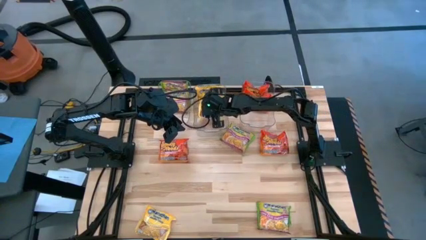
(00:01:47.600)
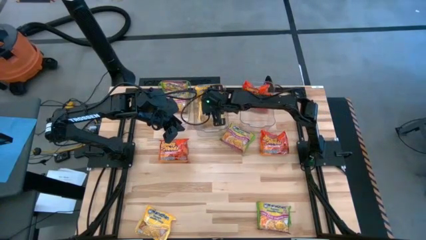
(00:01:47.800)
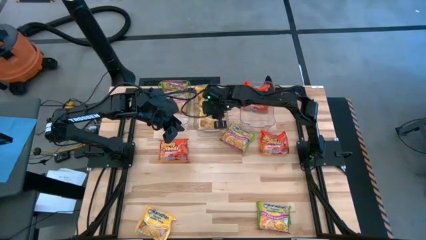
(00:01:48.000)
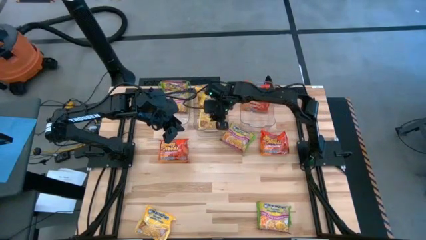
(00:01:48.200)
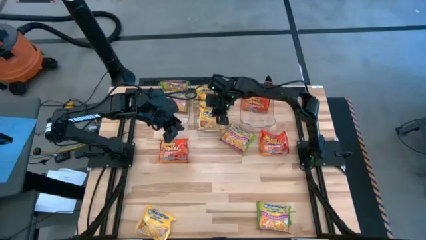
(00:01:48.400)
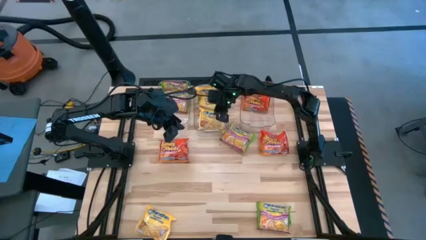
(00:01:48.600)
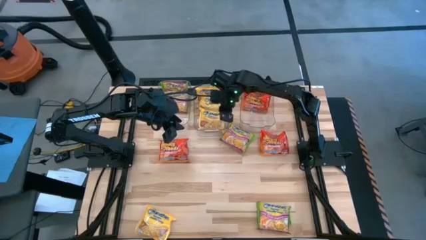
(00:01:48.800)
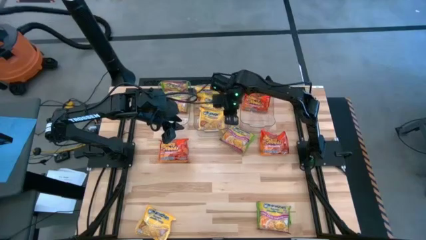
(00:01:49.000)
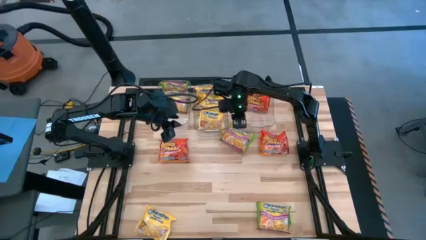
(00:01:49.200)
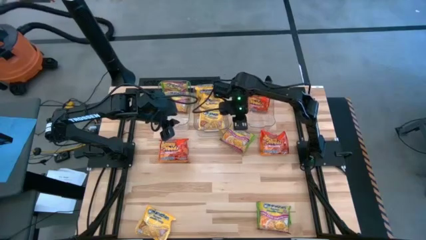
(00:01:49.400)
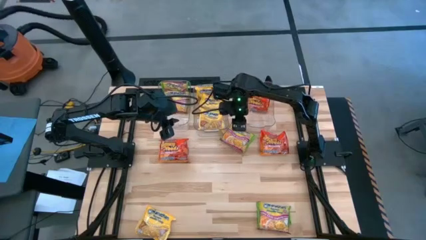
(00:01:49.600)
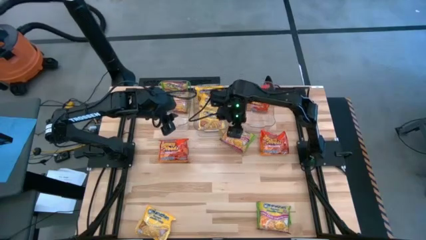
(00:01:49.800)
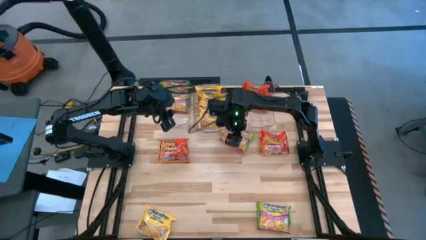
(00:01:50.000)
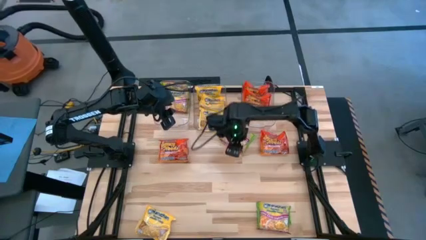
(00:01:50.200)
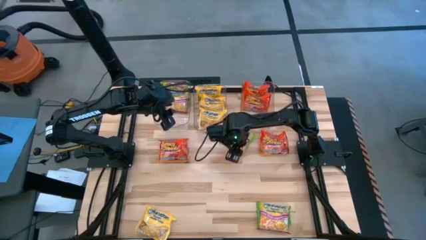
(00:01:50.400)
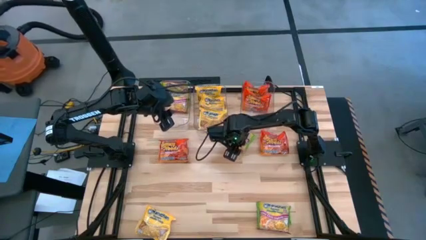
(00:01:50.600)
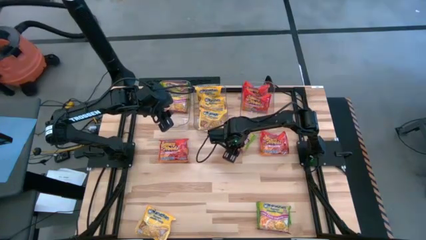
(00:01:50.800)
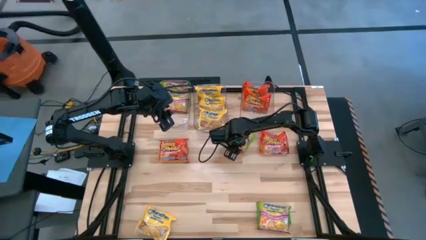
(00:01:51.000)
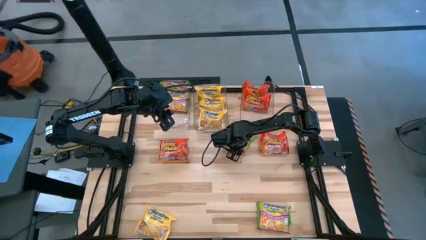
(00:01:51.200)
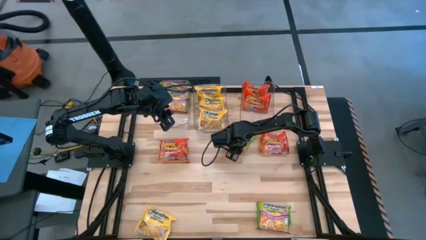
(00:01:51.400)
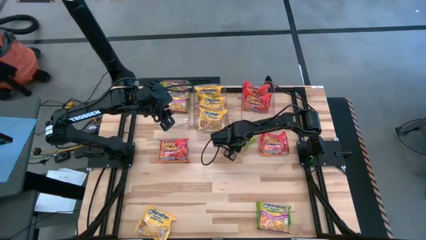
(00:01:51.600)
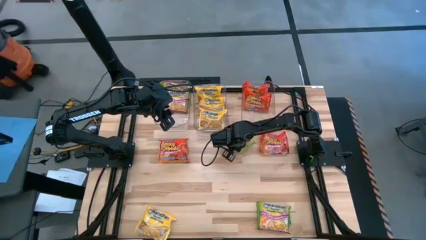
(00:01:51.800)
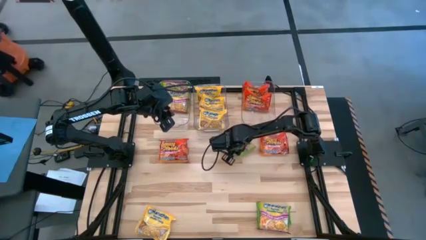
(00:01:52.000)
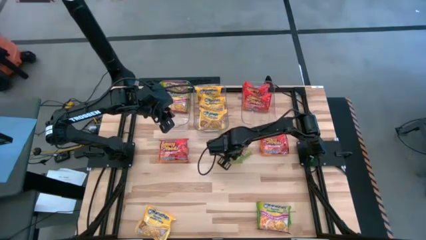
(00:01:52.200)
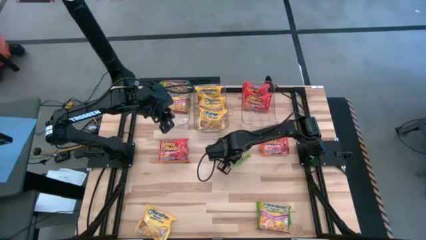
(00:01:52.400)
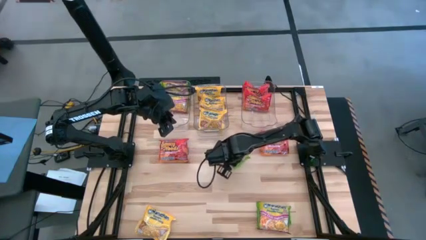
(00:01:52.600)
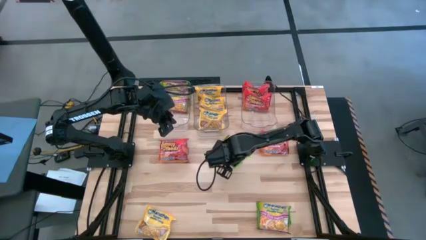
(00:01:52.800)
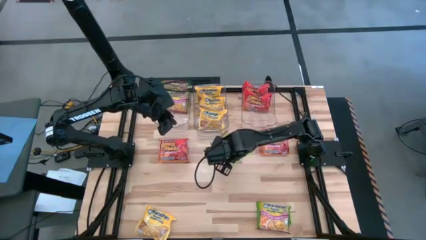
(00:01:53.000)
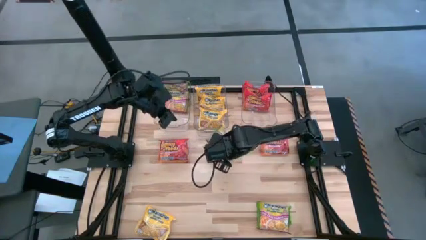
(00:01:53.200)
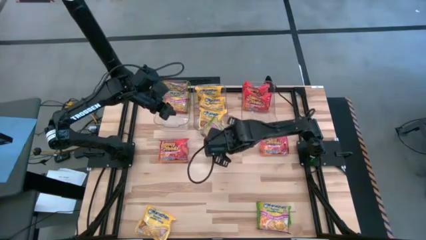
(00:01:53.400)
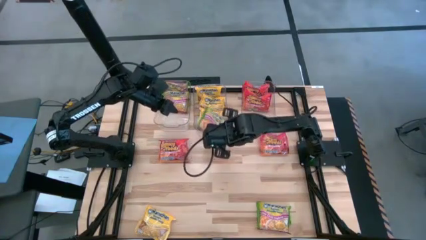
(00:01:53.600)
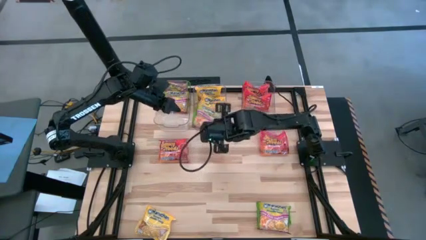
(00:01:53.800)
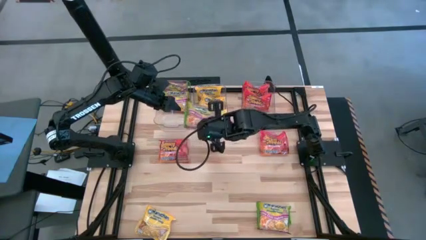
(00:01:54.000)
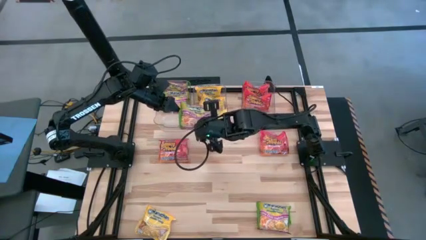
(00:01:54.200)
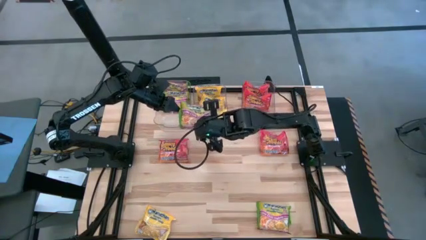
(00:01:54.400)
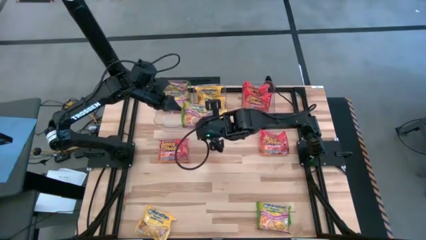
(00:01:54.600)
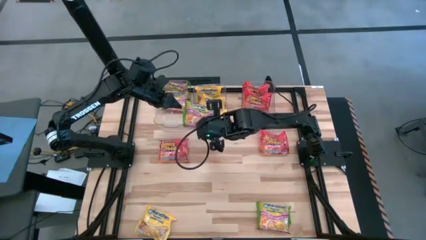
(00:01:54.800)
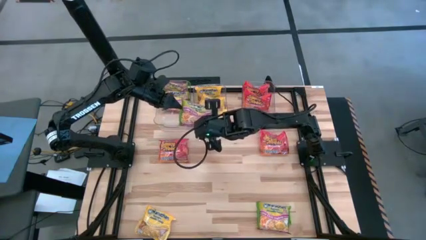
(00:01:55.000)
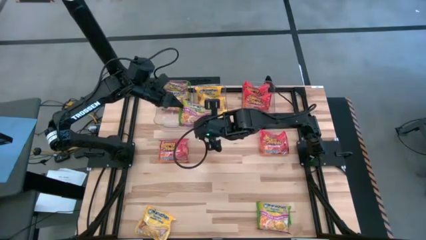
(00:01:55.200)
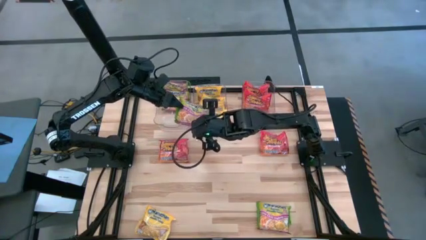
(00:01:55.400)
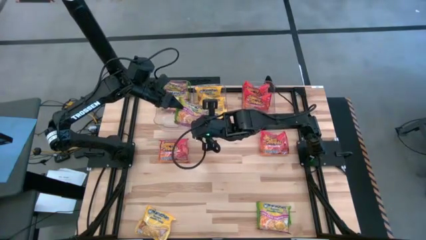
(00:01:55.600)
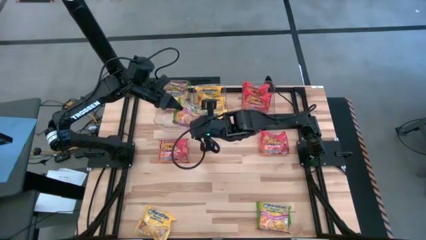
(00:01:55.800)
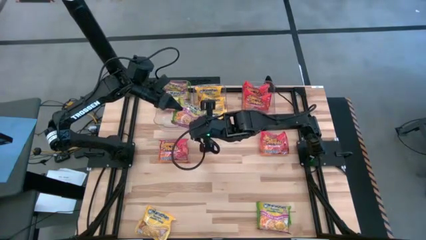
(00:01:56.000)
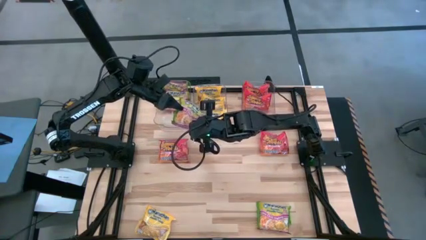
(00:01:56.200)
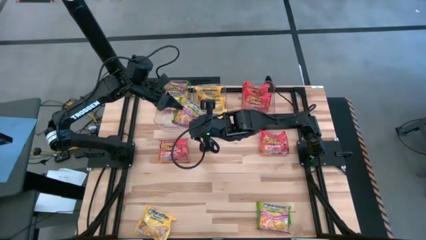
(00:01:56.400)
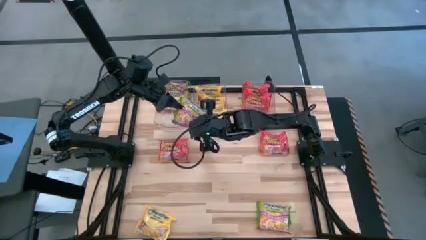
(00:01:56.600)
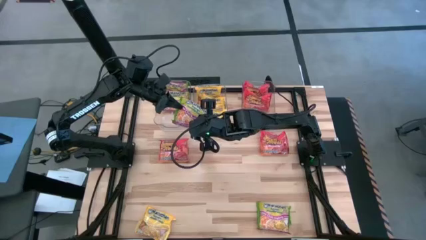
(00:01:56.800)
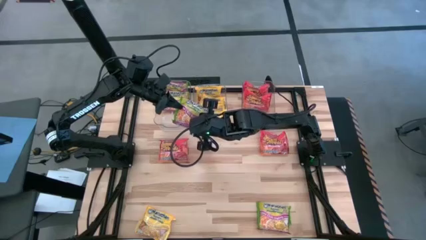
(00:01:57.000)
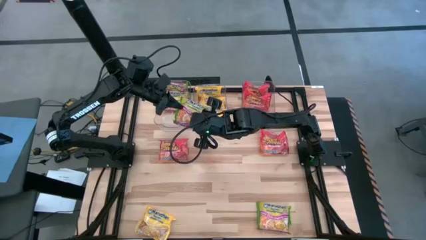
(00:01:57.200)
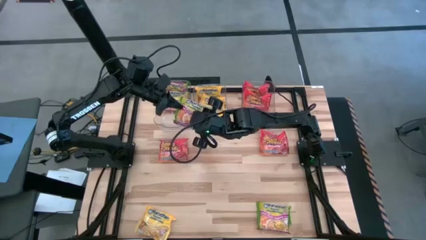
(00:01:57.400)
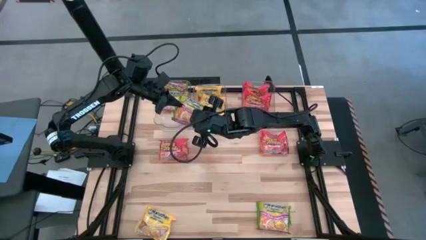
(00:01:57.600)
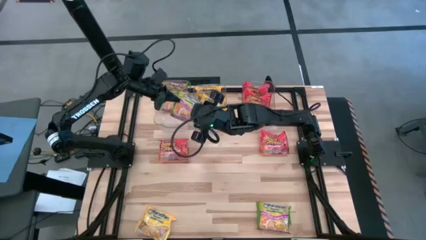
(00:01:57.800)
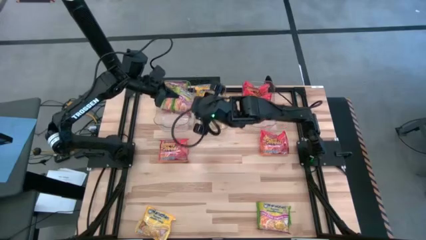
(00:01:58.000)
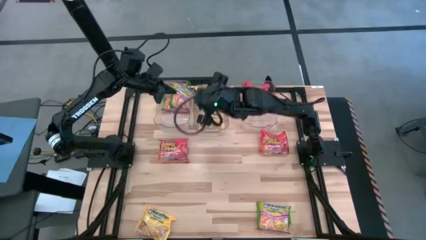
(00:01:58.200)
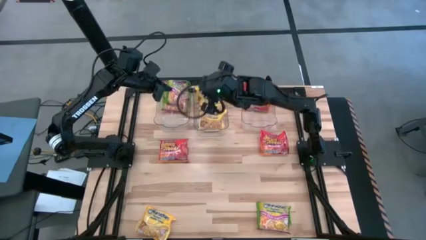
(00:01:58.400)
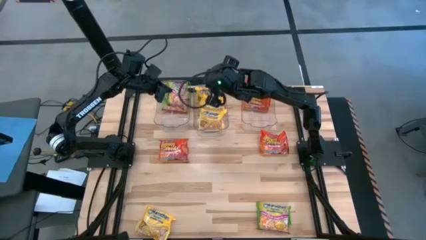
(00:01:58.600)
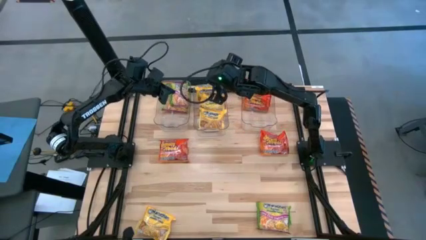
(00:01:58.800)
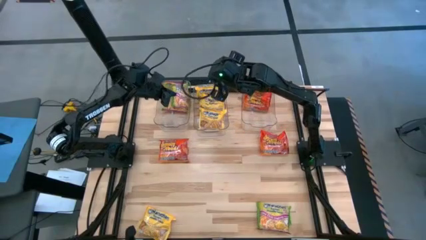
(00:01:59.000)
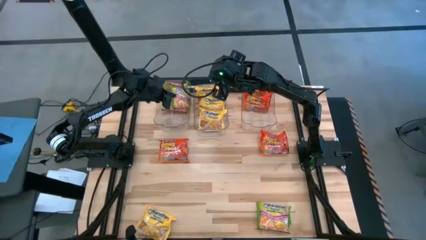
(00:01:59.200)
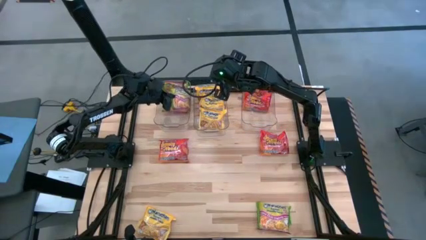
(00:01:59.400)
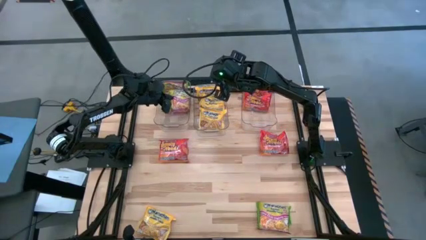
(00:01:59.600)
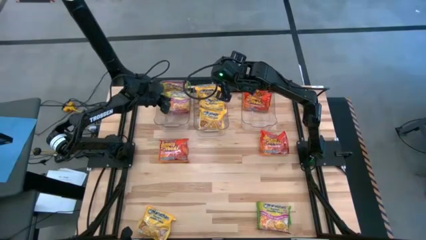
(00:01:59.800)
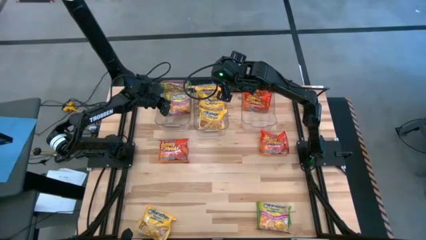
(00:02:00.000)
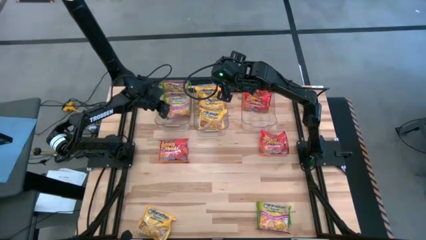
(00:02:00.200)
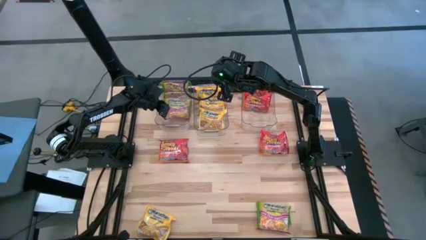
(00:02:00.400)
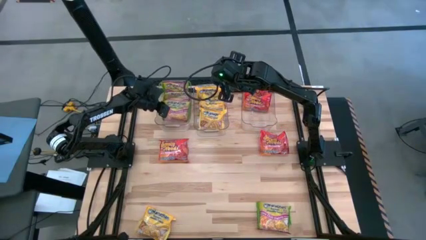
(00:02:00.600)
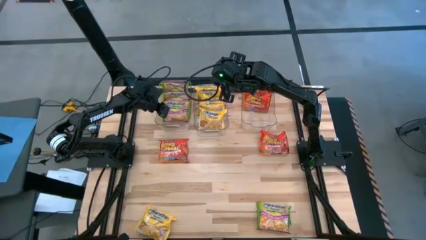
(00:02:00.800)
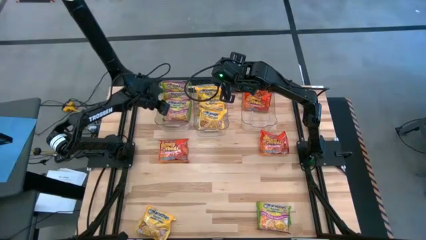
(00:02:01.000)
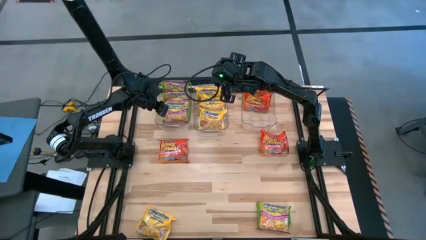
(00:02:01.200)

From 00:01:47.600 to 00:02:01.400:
Task: Sort Maruchan noodles
Put the green noodle pack into the left transparent bin

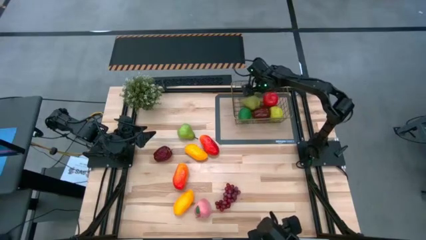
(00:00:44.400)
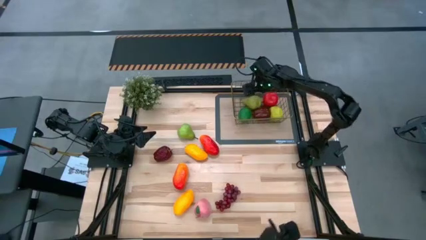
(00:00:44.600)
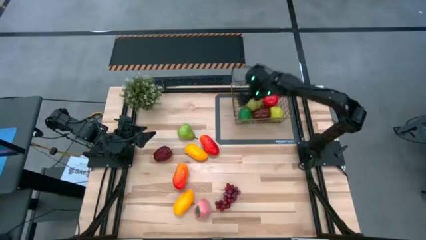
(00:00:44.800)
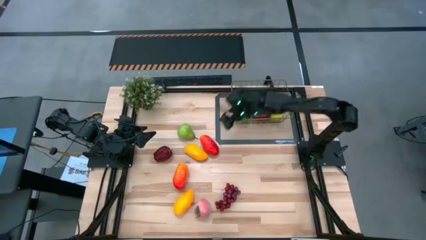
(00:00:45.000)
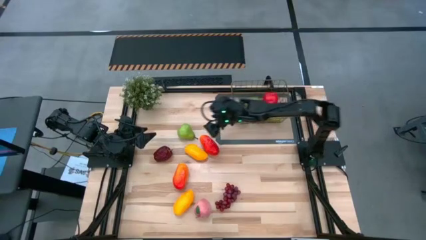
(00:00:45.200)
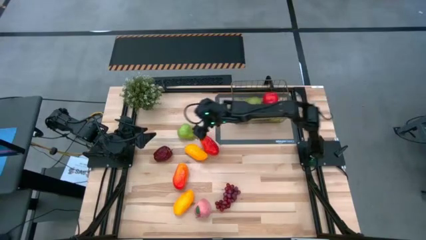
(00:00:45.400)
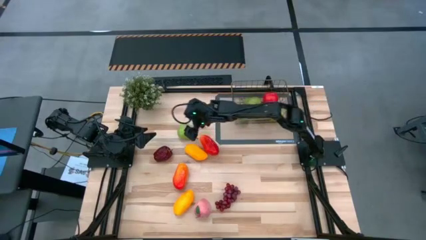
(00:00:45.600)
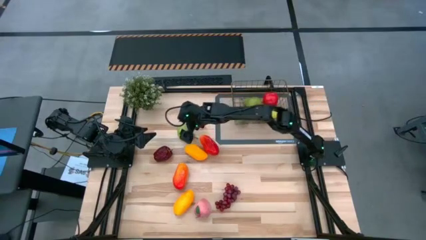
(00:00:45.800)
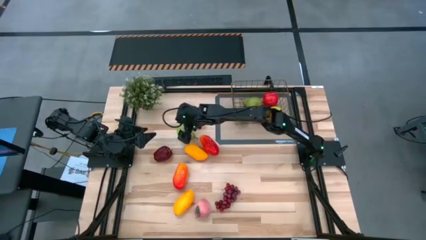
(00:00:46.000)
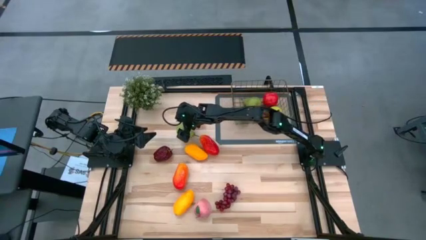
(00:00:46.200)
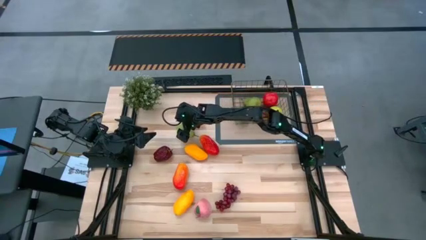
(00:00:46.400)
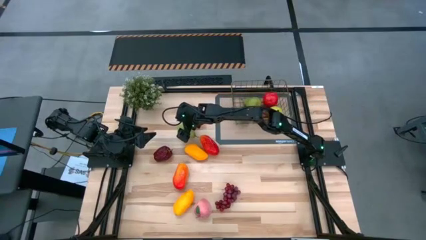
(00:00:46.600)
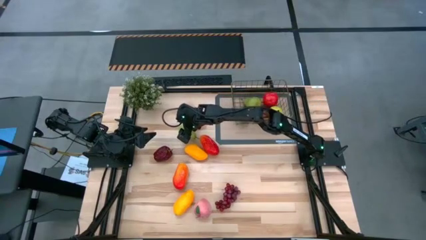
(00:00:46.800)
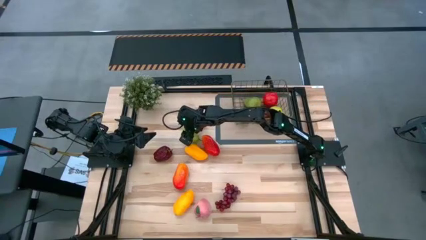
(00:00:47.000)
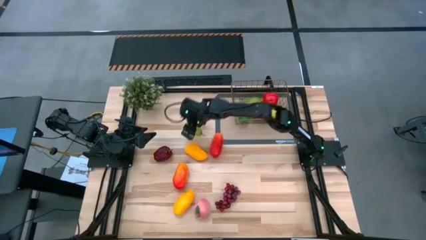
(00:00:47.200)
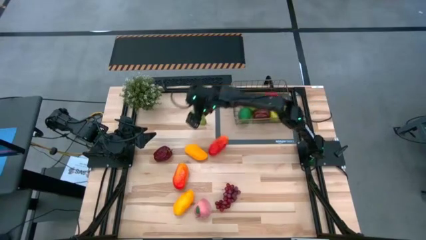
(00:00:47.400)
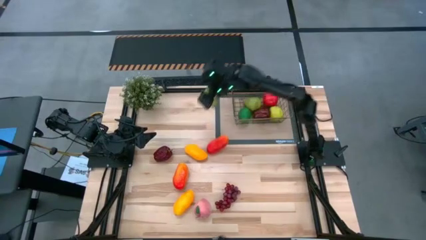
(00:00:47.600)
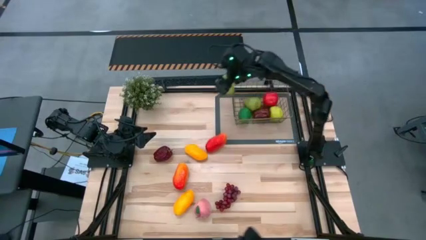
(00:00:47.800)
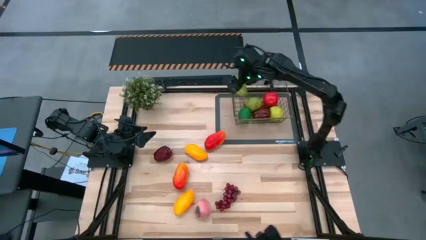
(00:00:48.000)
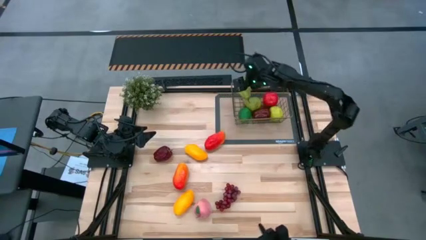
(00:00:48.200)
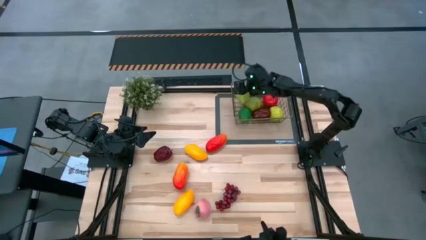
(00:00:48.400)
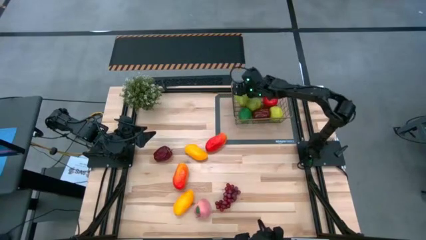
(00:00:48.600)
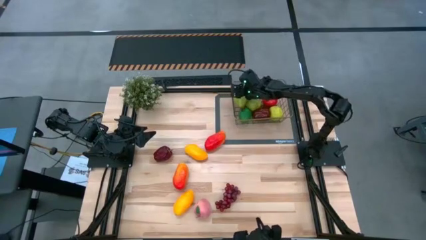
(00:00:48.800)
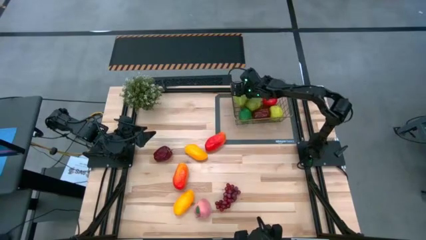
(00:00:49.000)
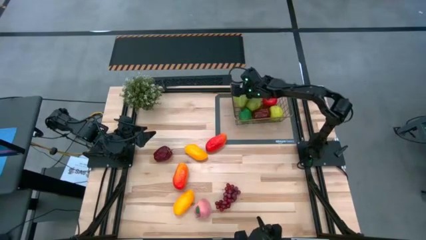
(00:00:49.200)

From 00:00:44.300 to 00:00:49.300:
Task: Build produce basket
Put the green pear into the gold wire basket
